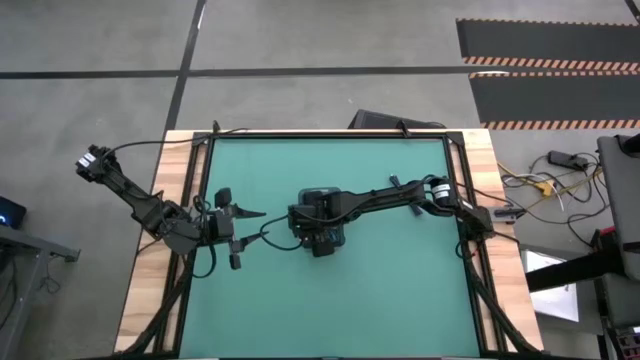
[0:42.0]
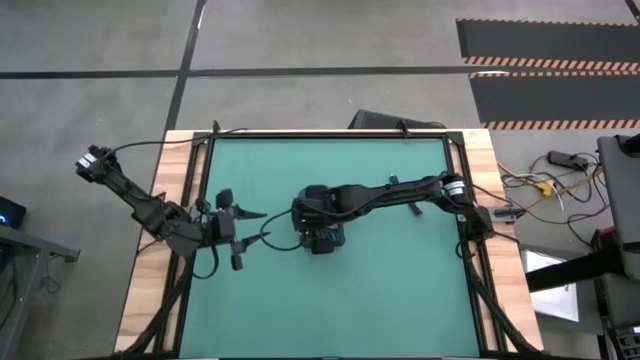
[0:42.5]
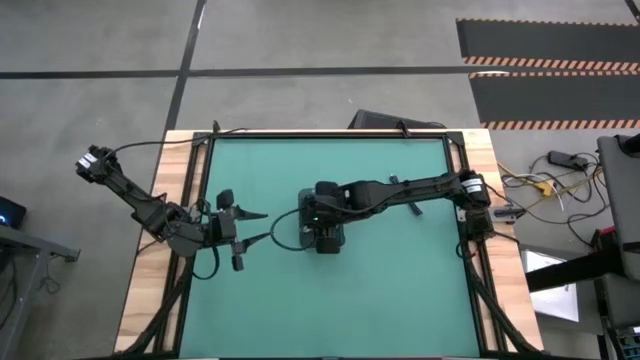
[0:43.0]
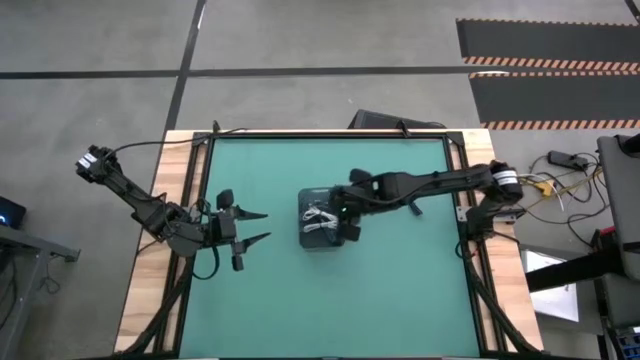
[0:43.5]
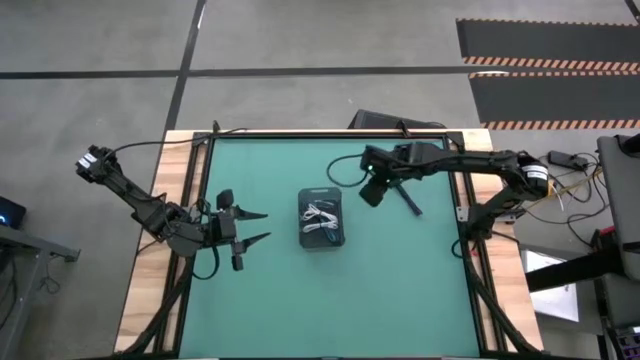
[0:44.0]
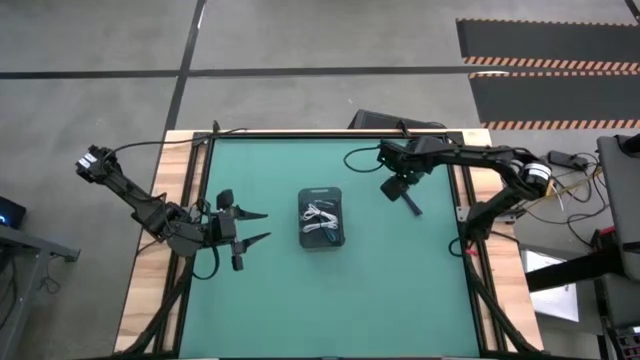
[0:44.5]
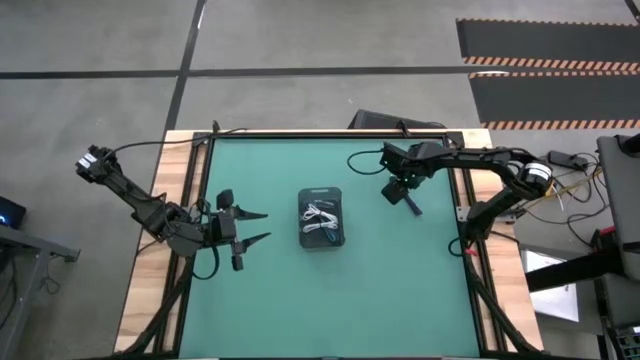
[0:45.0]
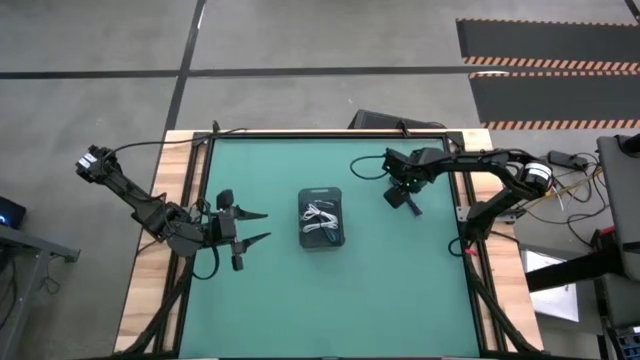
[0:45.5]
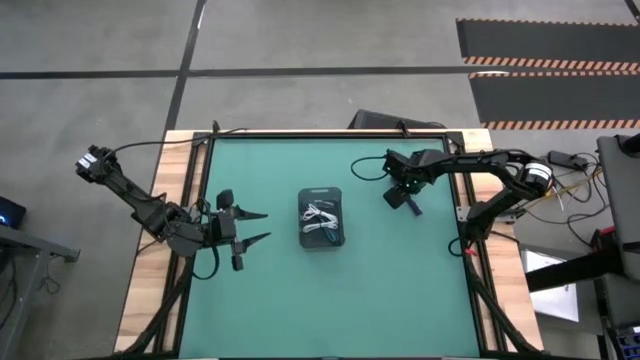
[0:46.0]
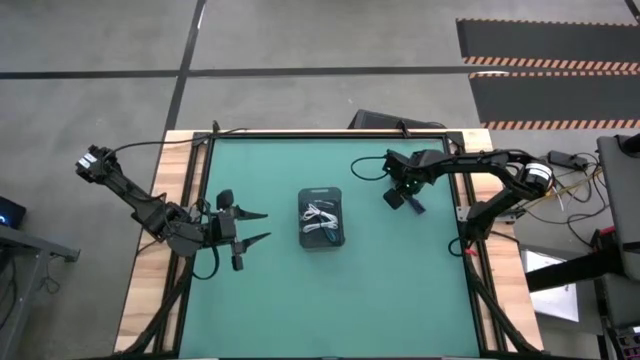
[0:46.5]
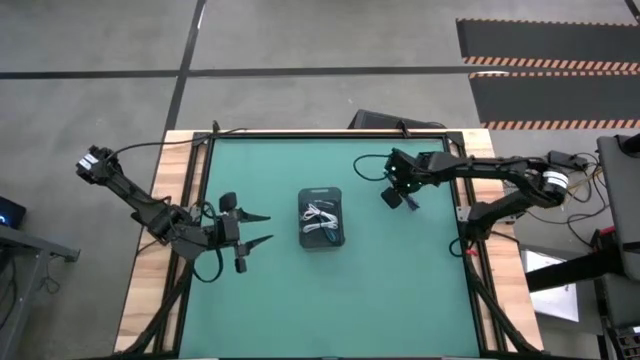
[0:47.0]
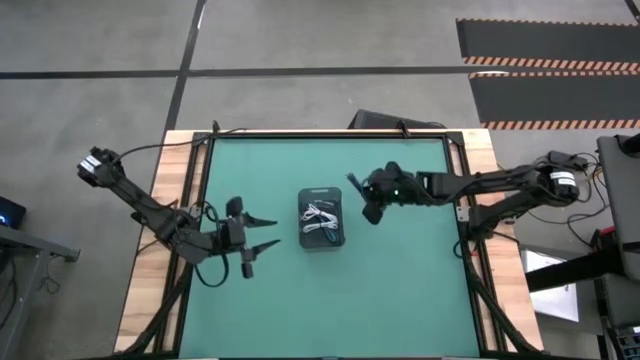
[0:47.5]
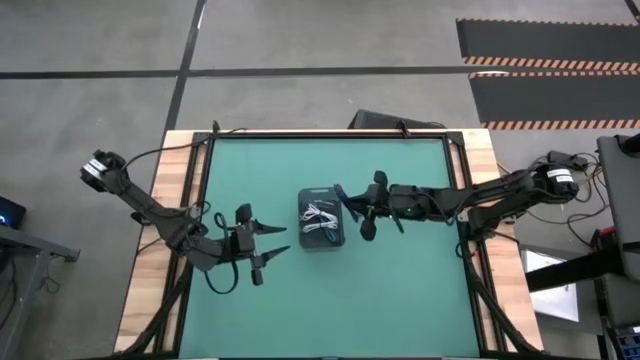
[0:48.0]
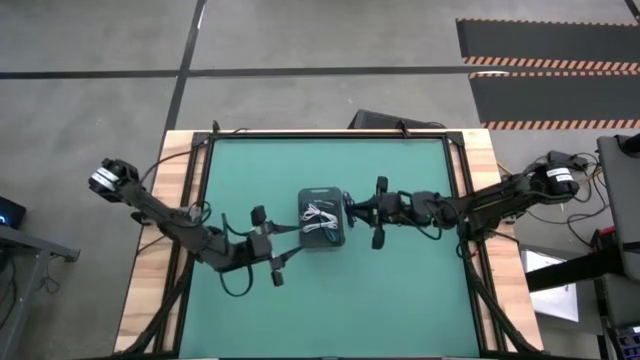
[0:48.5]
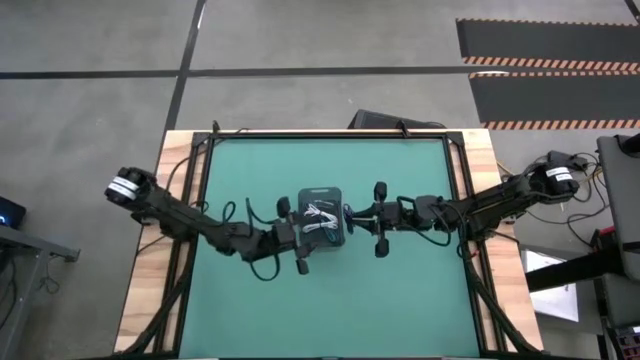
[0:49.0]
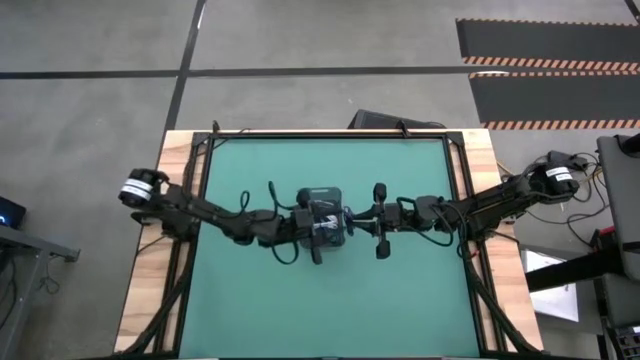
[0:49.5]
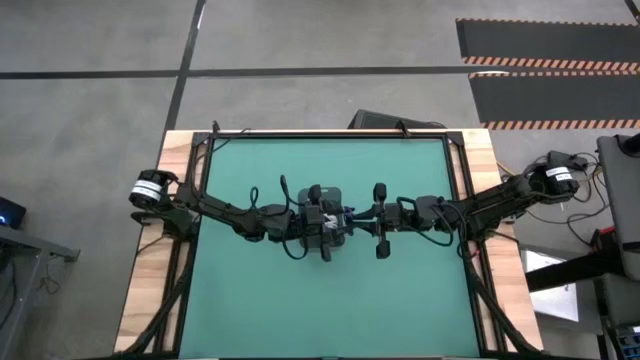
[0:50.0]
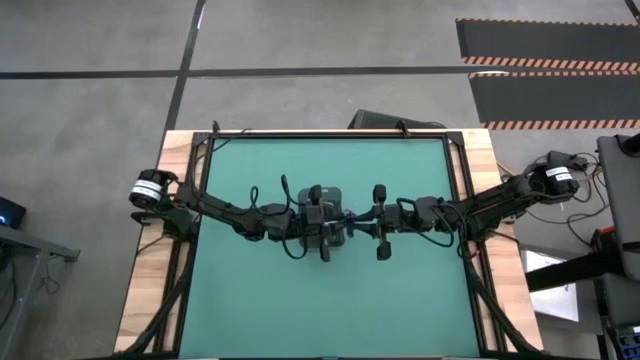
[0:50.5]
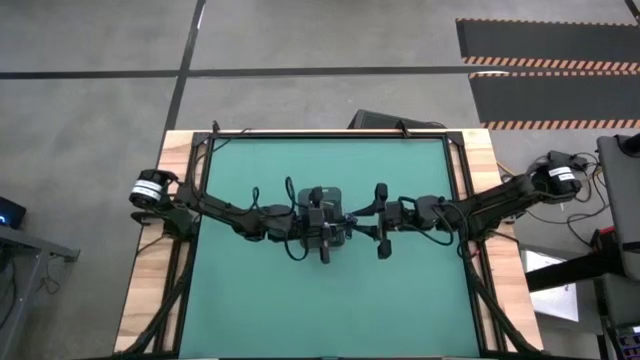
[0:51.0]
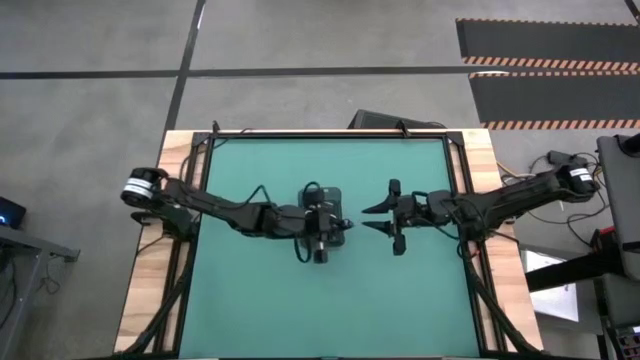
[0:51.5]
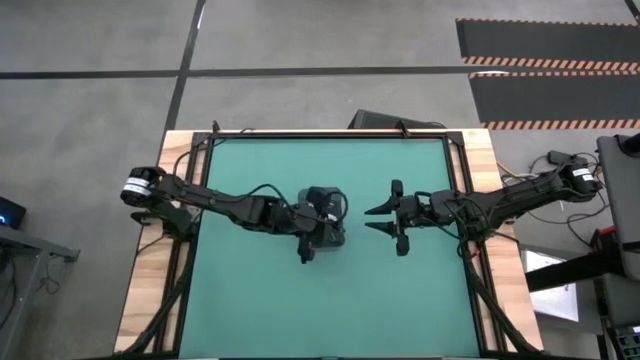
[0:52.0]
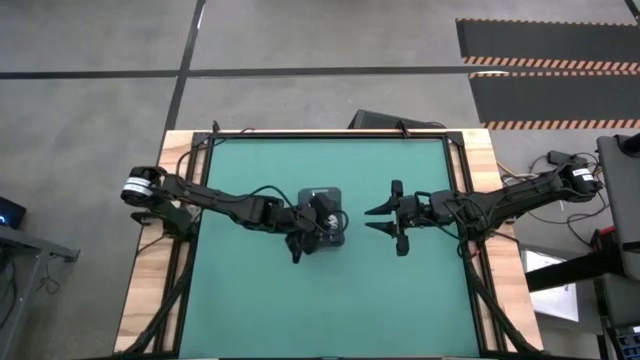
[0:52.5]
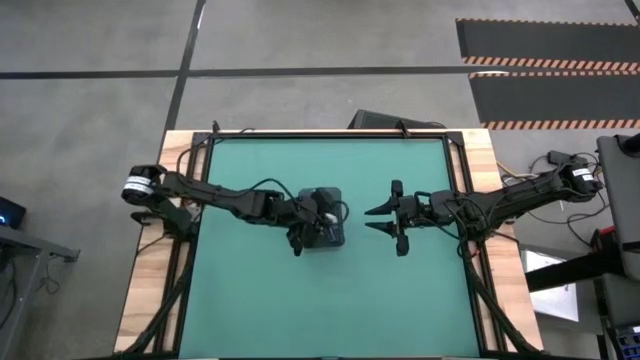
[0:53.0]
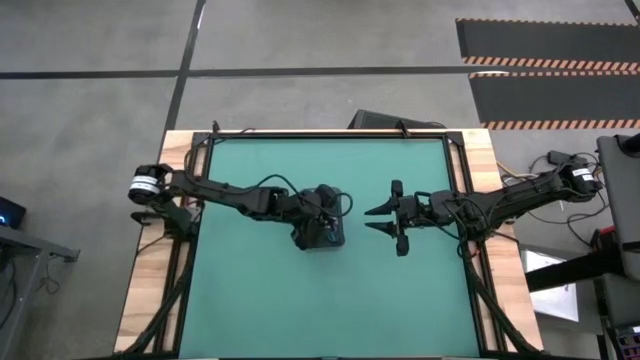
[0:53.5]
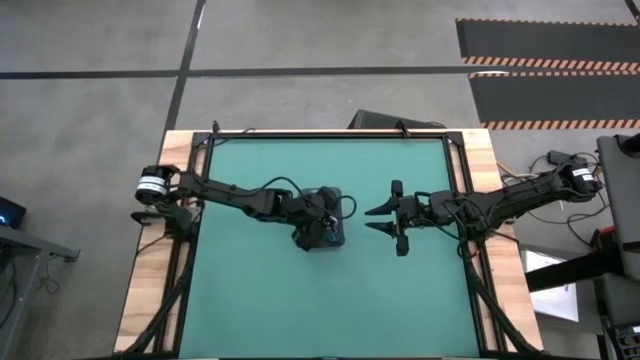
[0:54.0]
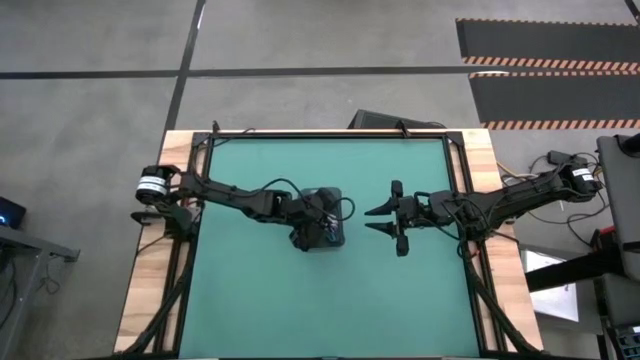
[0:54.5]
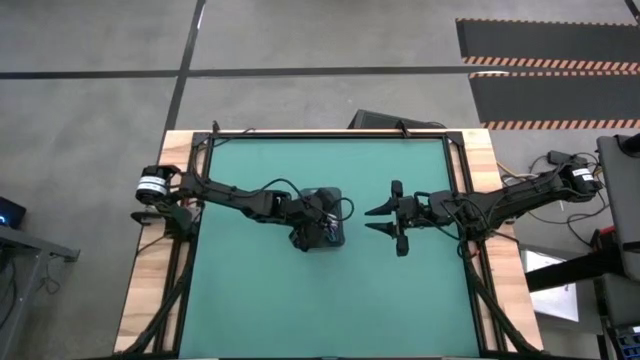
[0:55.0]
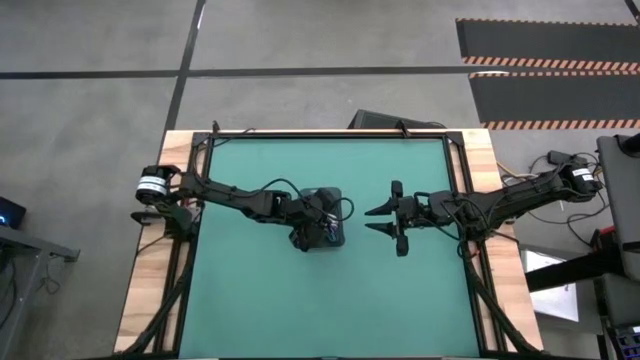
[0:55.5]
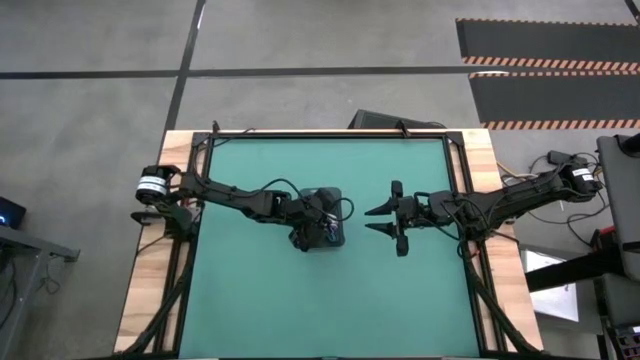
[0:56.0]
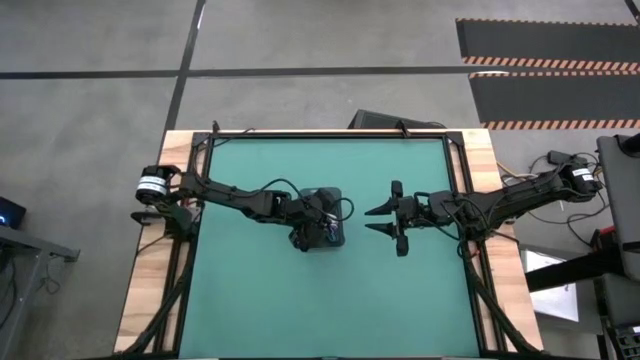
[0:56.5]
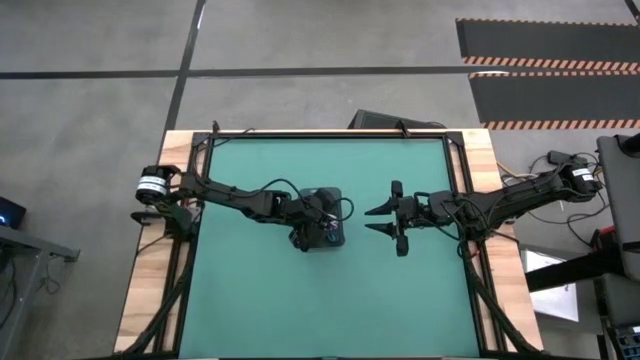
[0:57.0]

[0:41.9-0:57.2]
Task: Pick and place USB-C Cables
Put the purple white charger cable into the black bin

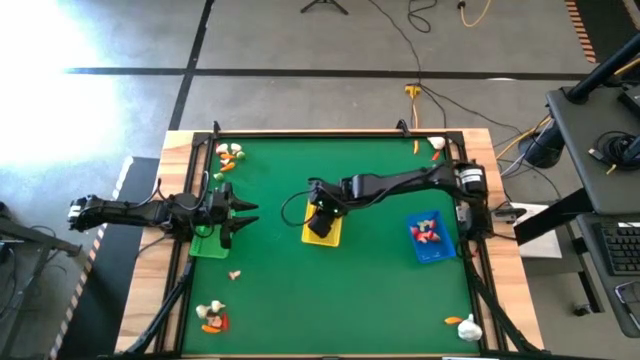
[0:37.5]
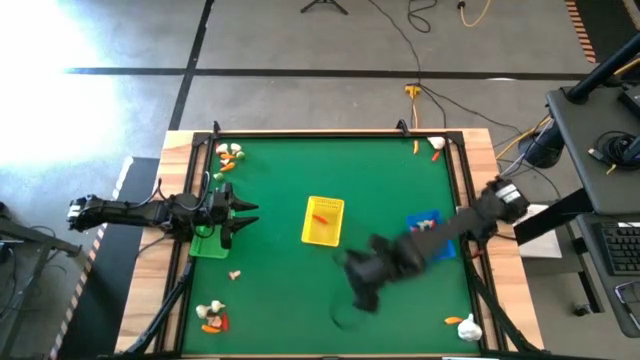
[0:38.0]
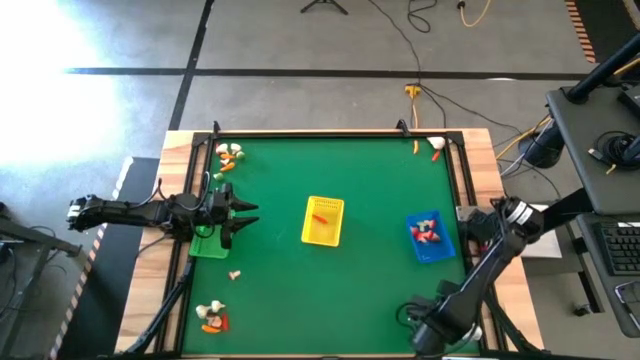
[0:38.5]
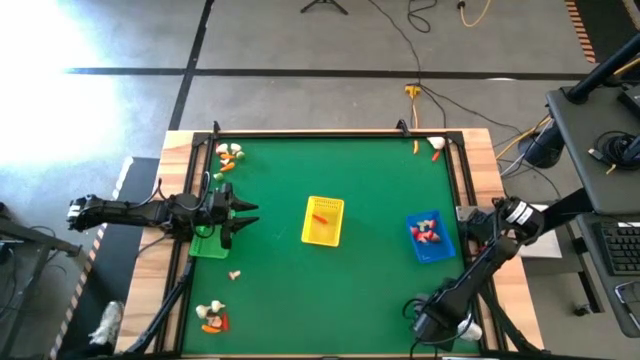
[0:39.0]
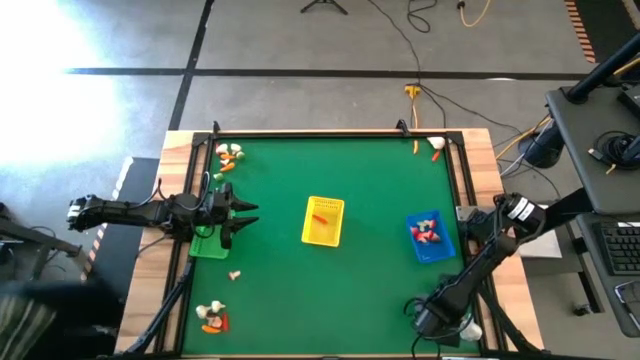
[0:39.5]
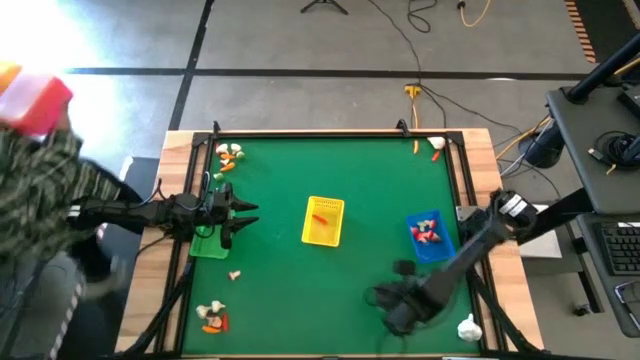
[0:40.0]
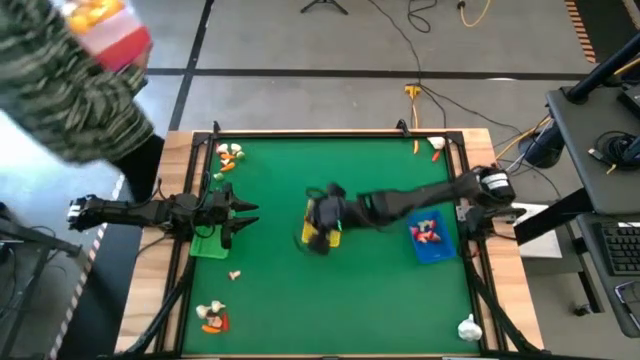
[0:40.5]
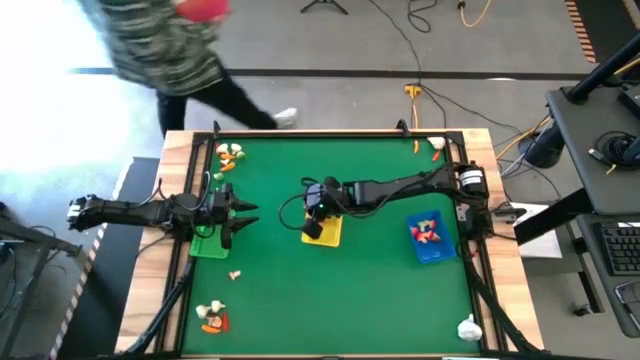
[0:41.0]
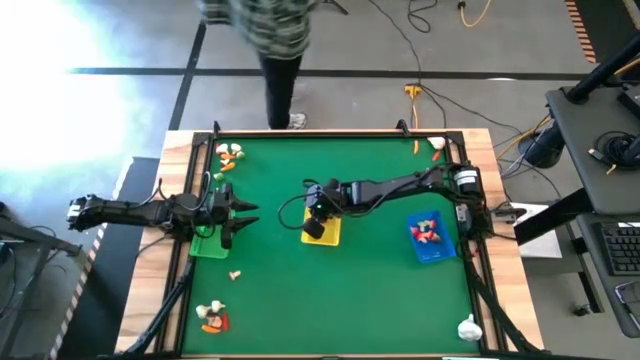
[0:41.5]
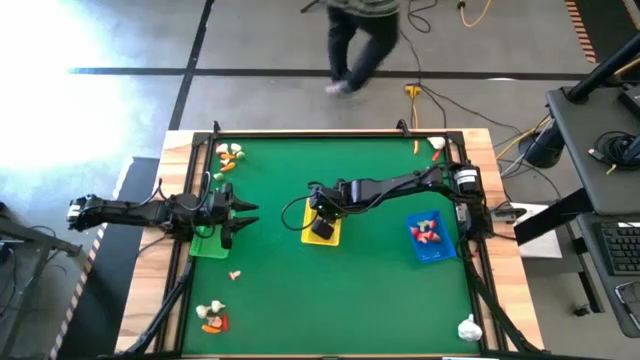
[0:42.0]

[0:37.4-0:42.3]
Task: Sort produce into baskets
Put the yellow chili pepper into the yellow bin

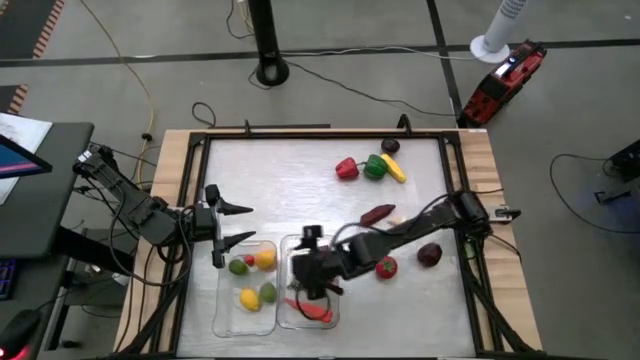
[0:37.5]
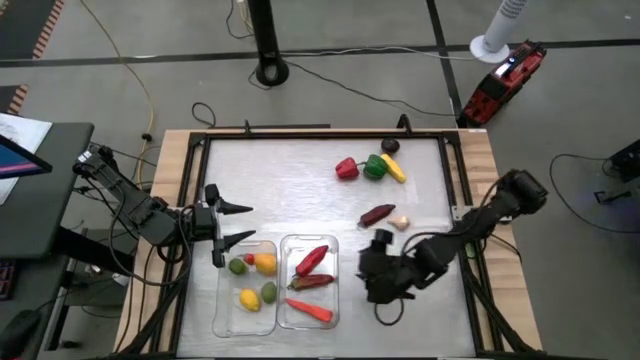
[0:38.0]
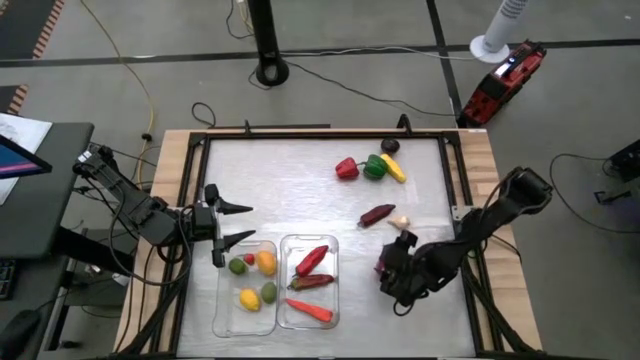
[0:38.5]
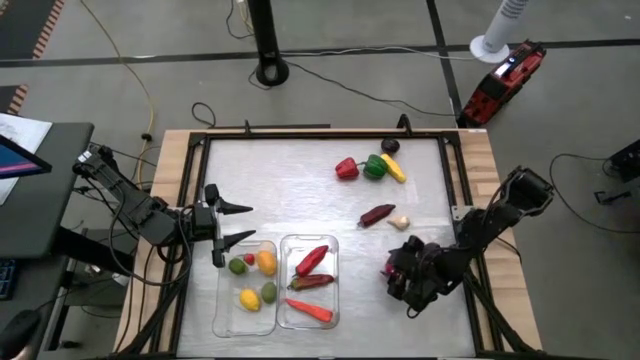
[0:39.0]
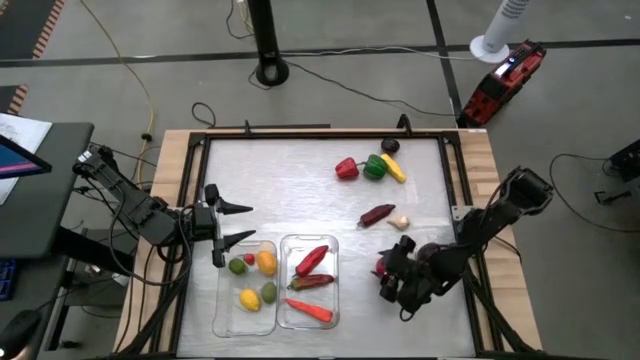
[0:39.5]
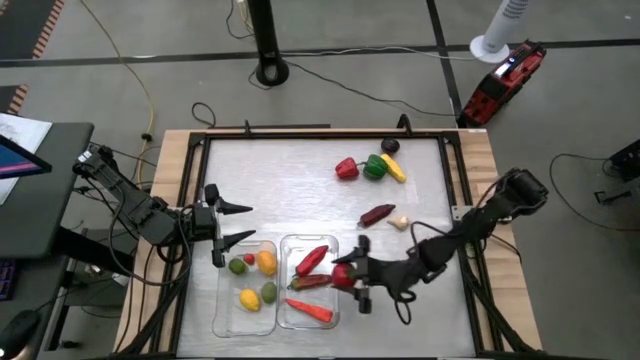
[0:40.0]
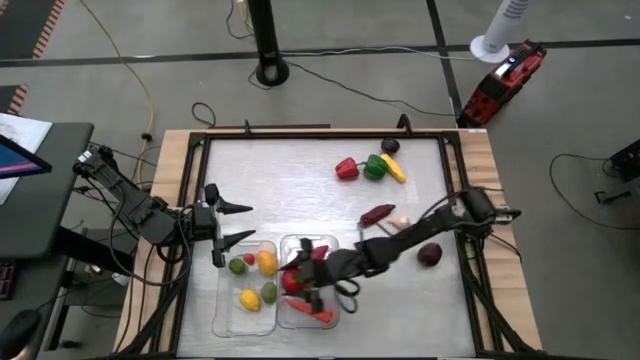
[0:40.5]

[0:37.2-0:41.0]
Task: Sort produce into baskets
Put the red tomato into the left transparent bin
